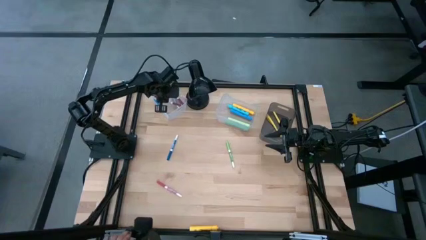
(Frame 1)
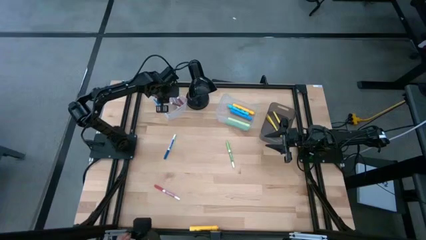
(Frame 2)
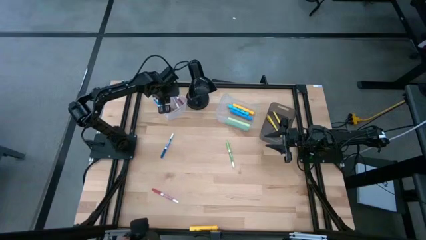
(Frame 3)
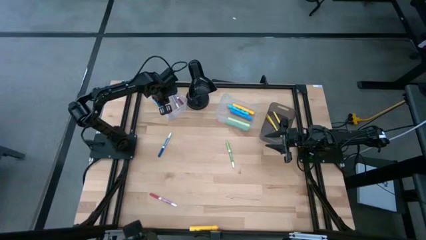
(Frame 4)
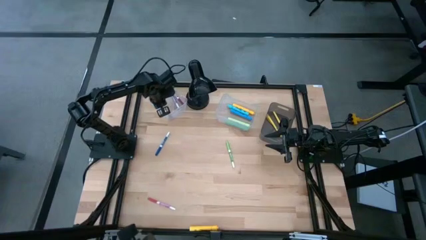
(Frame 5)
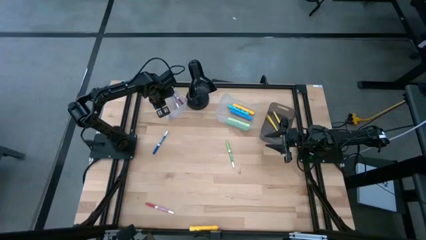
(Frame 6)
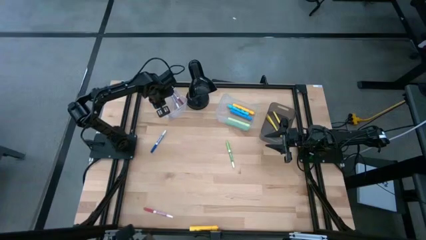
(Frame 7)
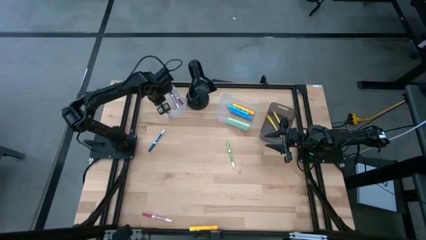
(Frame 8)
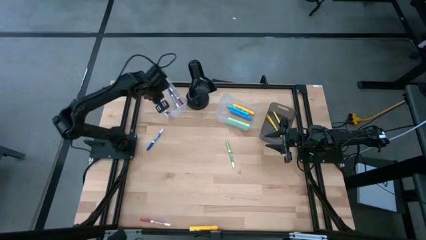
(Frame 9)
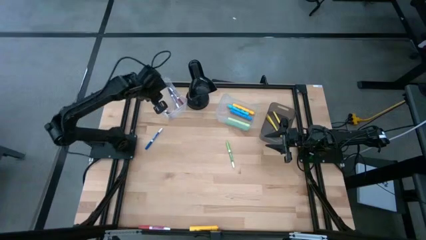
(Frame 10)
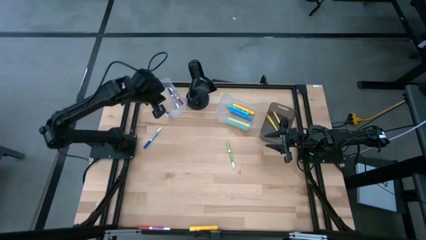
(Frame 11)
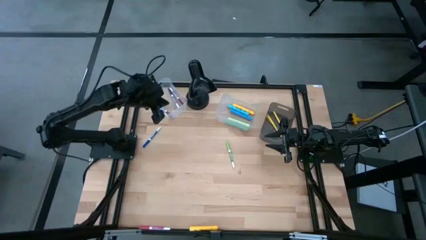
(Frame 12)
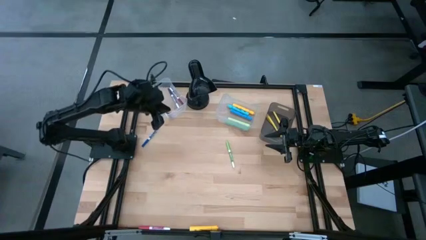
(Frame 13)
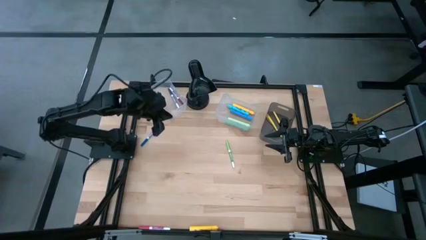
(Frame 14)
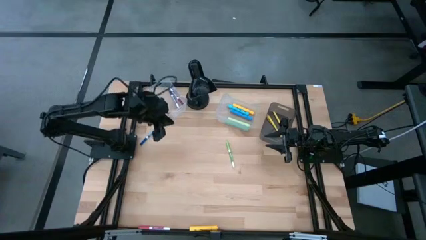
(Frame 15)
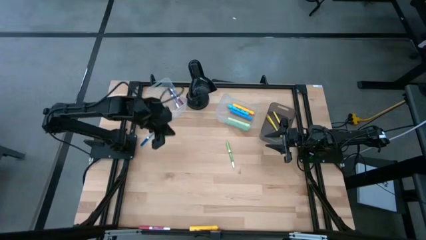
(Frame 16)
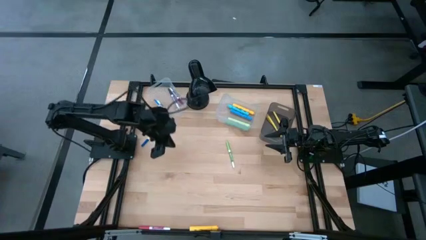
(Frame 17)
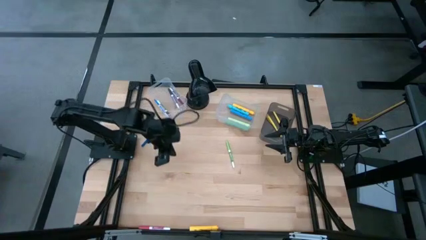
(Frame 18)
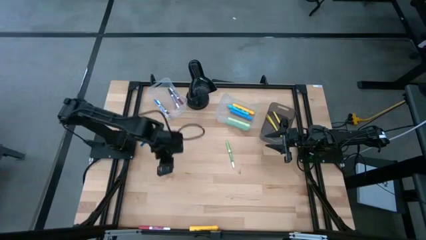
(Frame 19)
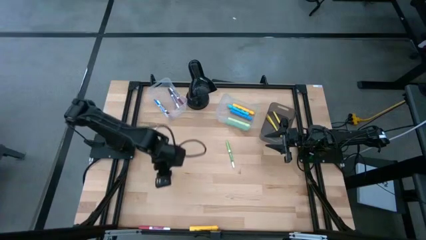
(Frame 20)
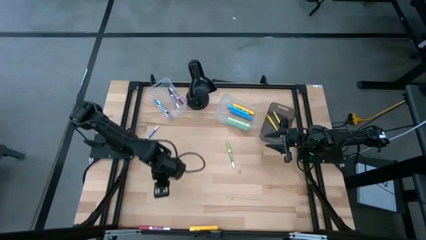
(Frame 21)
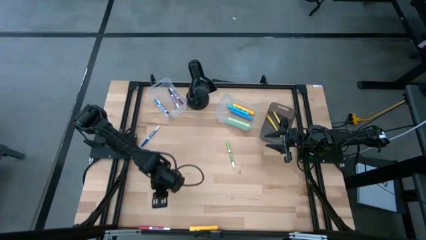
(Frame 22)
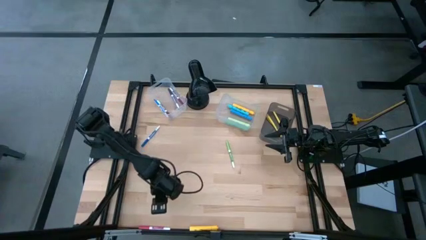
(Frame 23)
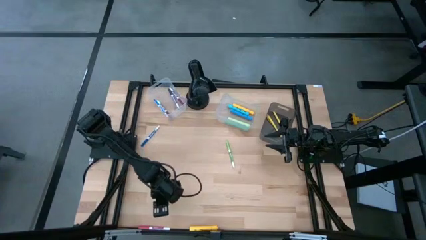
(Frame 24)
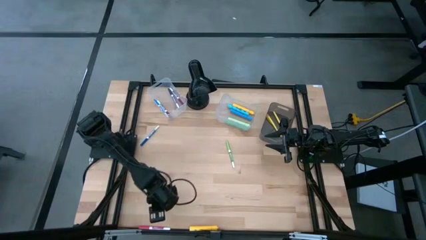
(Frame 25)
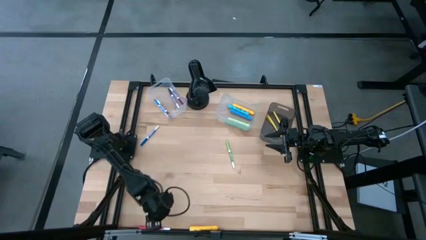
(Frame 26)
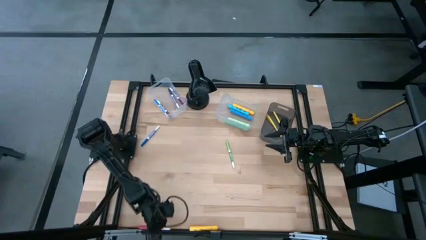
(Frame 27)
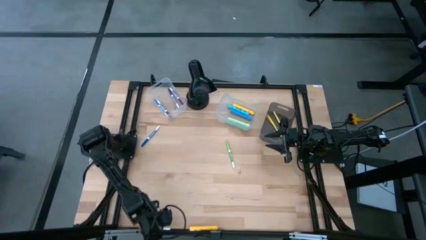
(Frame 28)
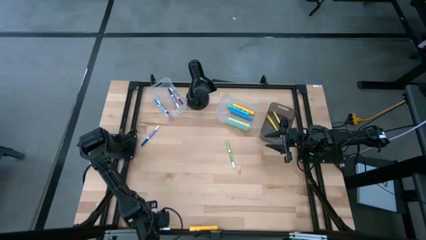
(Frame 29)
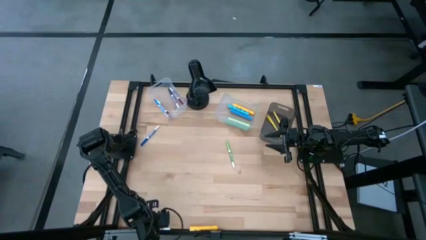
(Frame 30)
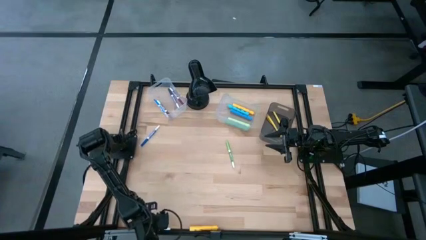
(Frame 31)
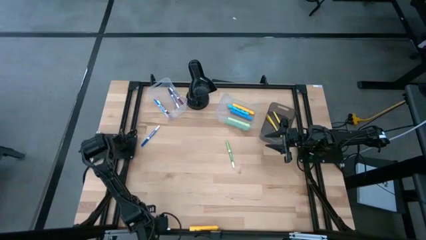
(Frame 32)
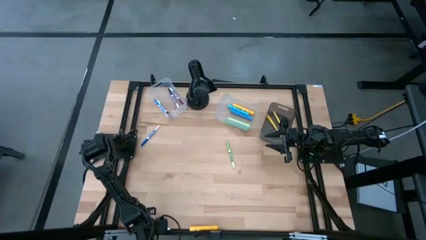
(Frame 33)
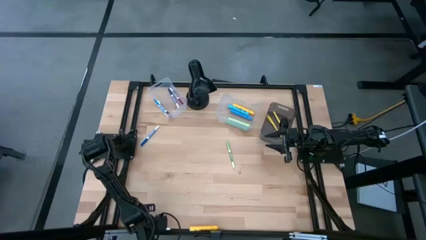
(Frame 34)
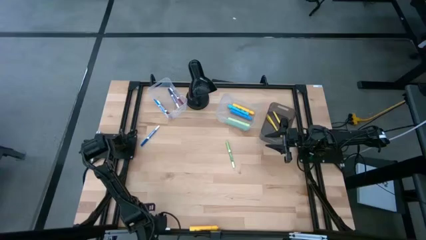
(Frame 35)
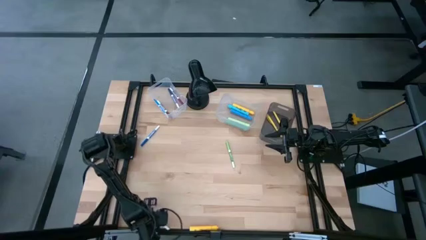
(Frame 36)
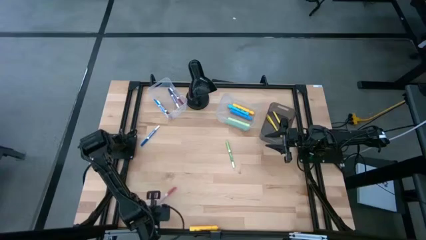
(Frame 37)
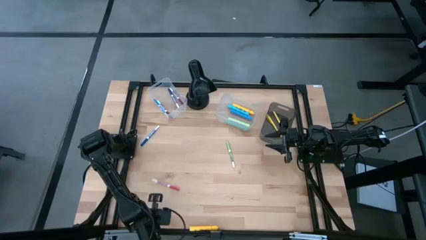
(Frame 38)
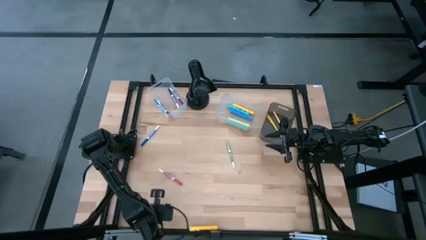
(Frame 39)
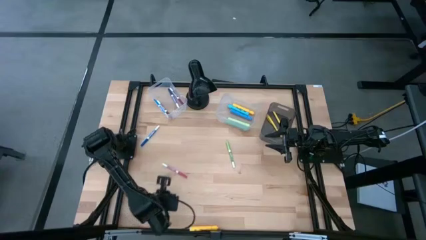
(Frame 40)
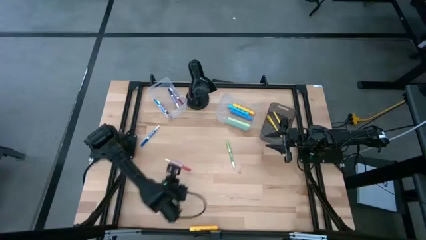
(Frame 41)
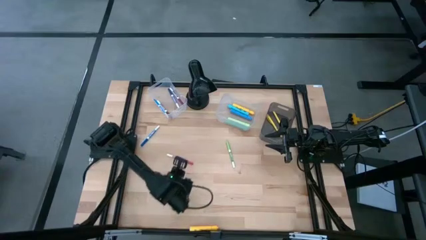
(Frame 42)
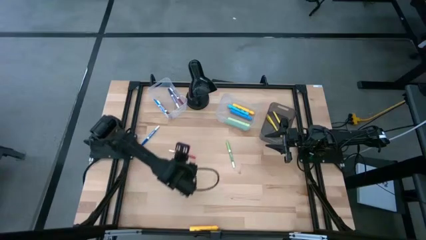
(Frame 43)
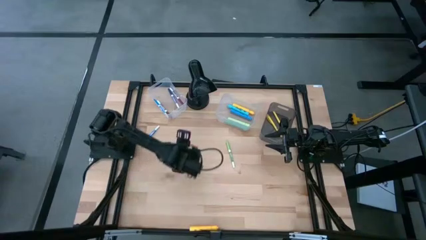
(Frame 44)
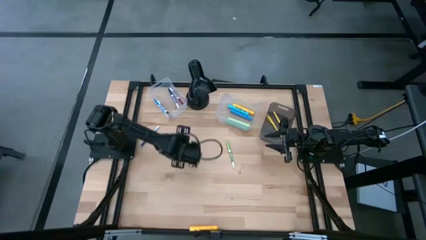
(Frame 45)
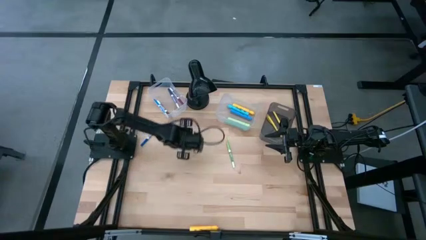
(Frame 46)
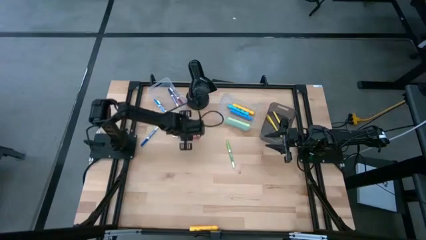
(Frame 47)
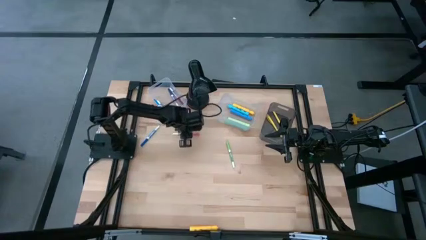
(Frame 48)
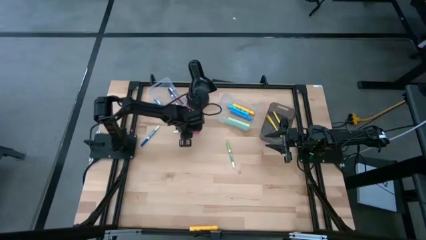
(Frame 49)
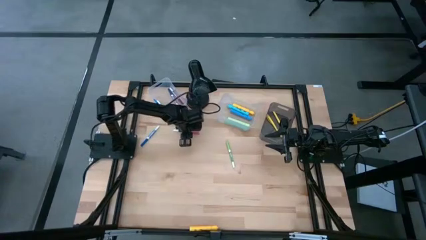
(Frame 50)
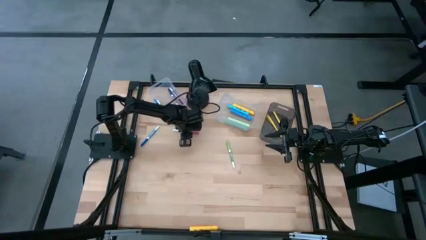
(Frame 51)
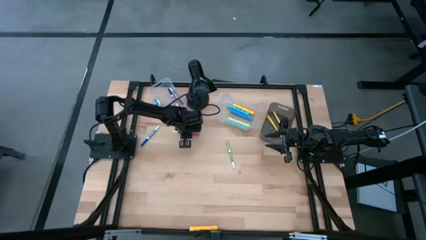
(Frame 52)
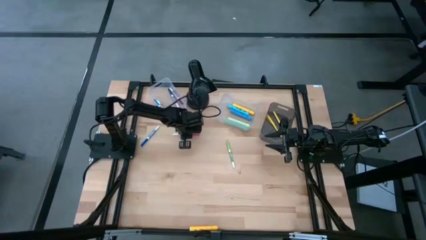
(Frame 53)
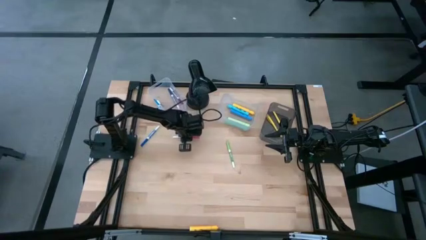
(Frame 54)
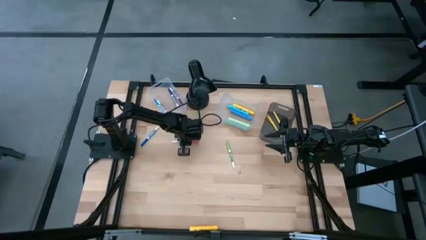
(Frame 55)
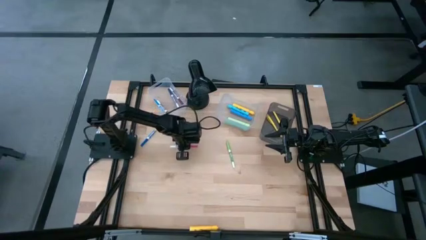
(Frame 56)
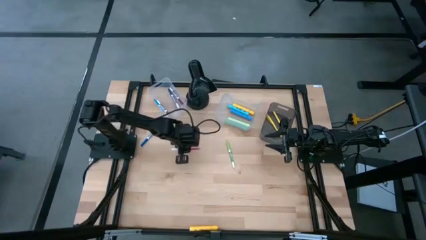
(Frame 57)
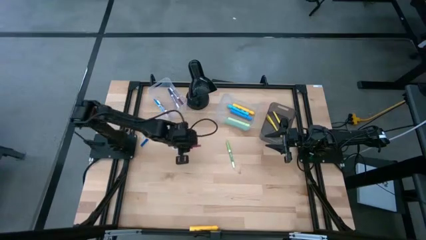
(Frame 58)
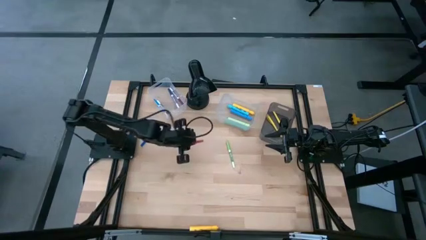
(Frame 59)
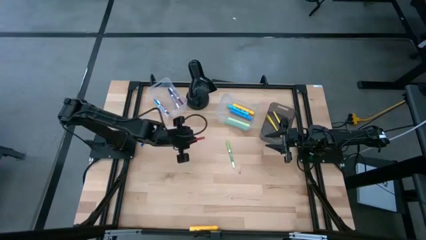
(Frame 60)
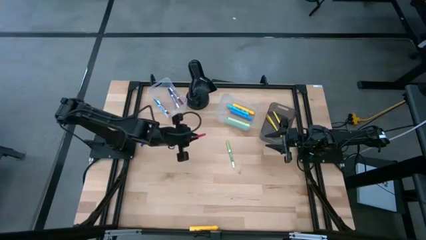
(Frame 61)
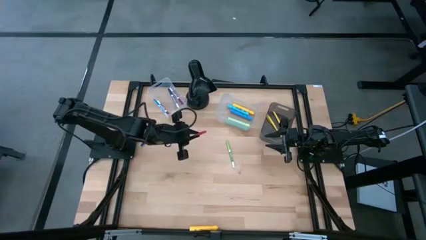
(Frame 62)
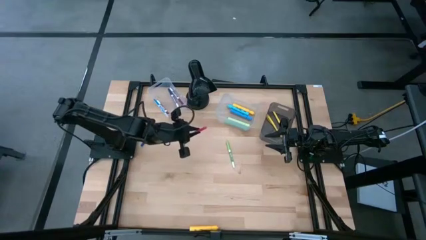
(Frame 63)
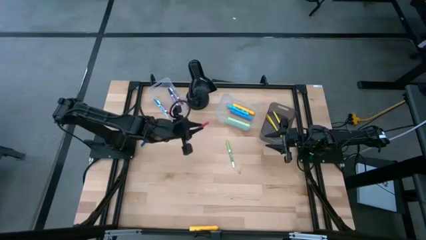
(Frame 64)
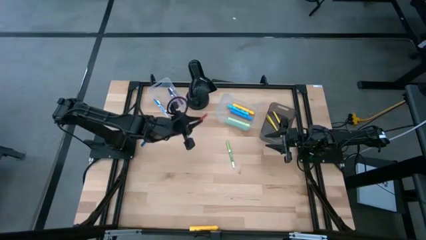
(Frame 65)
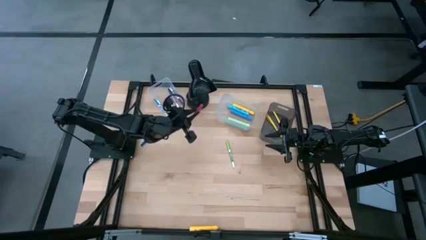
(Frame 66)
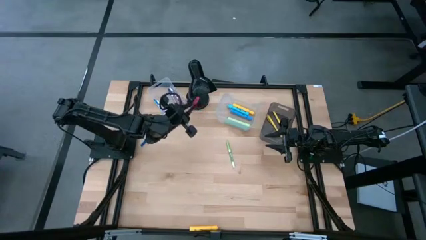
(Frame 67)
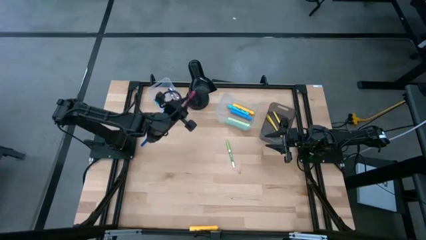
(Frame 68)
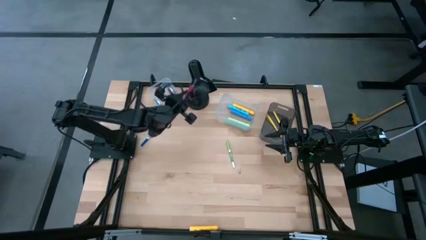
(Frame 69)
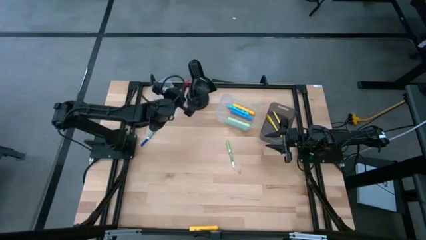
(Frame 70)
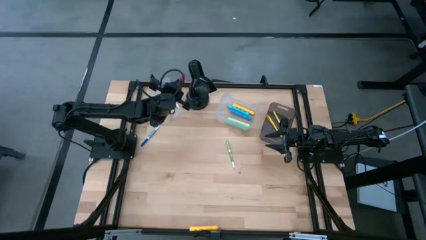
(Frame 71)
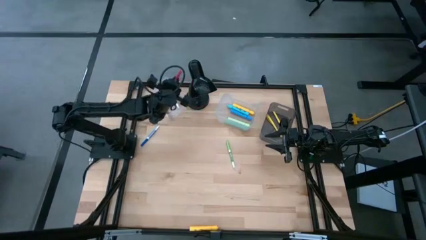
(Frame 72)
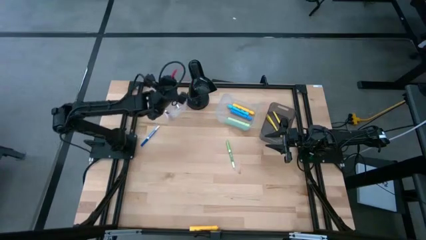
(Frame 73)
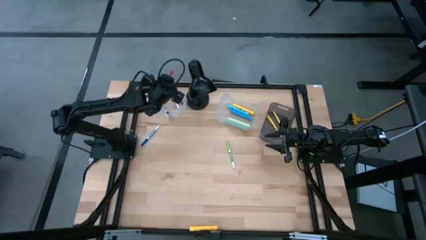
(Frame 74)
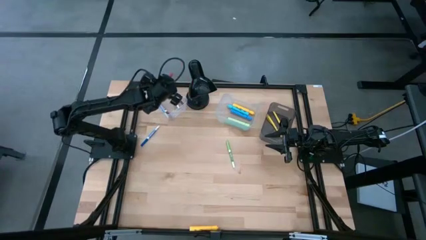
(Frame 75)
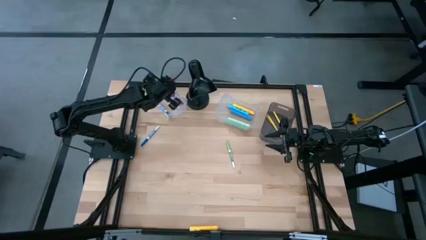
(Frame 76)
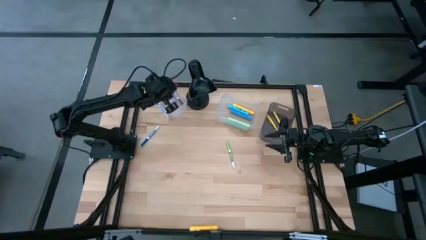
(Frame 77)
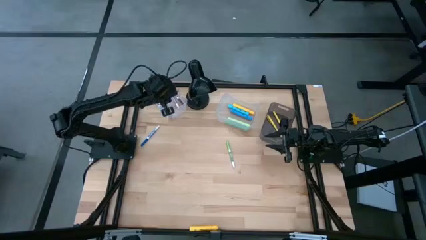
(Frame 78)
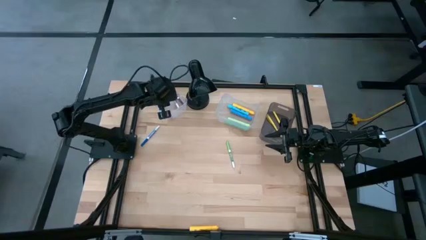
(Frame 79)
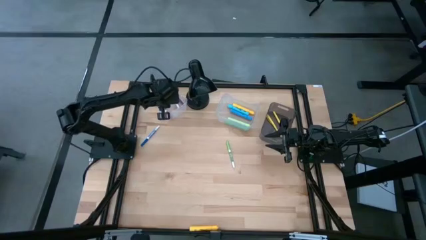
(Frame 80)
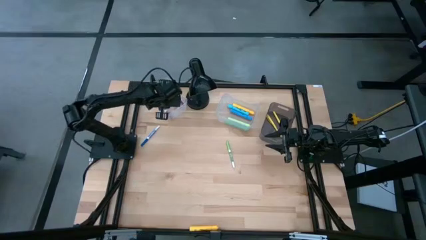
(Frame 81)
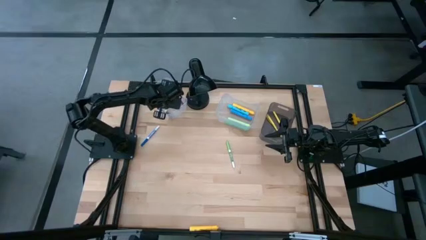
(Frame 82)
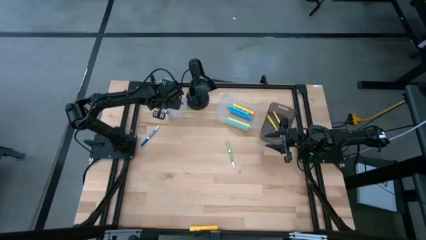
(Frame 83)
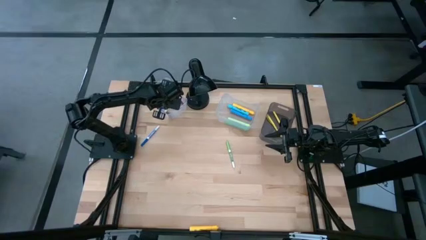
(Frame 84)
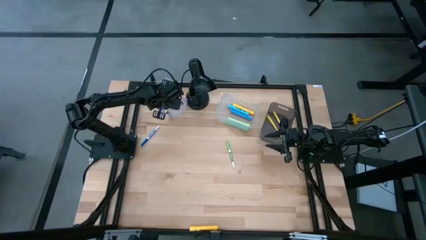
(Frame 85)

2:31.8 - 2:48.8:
Task: Pick & Place Markers
Put the red marker in the left transparent bin
